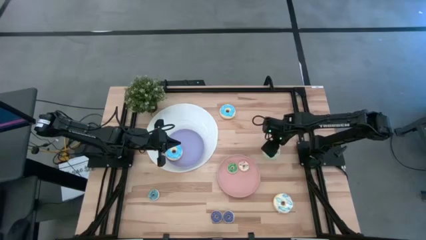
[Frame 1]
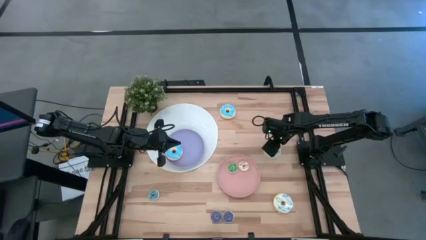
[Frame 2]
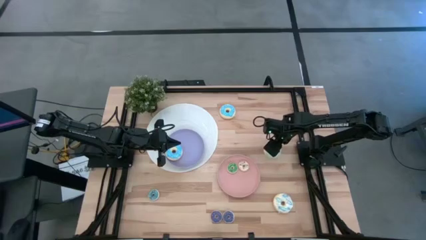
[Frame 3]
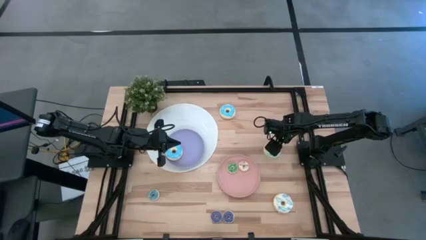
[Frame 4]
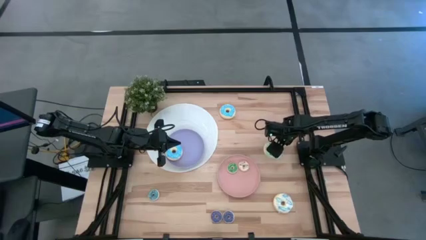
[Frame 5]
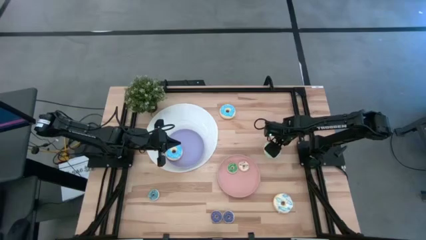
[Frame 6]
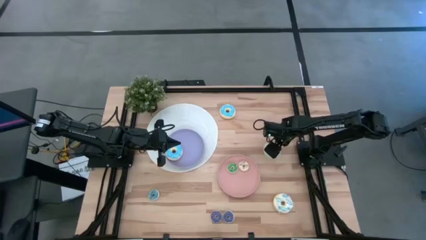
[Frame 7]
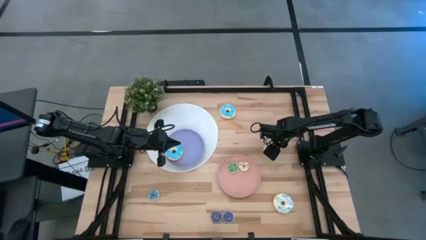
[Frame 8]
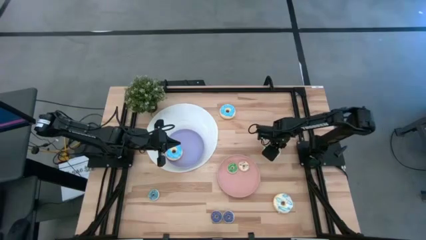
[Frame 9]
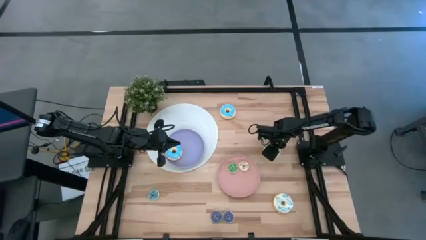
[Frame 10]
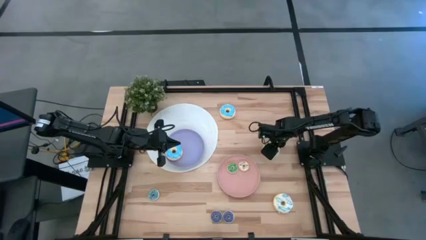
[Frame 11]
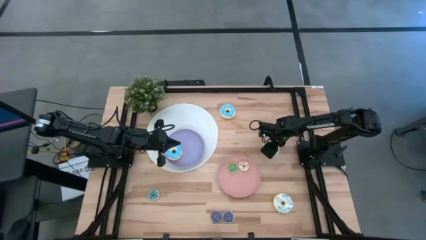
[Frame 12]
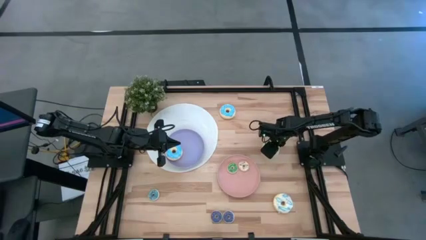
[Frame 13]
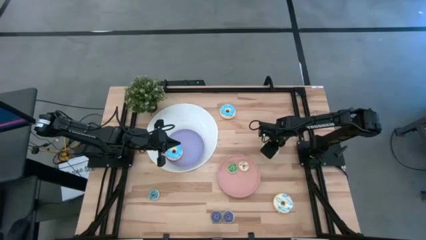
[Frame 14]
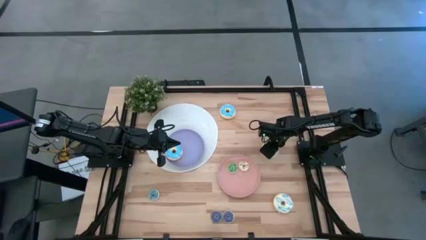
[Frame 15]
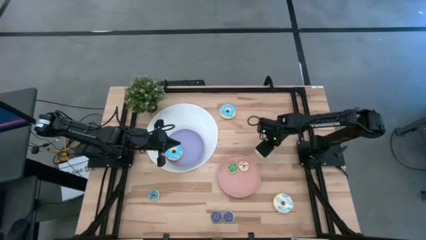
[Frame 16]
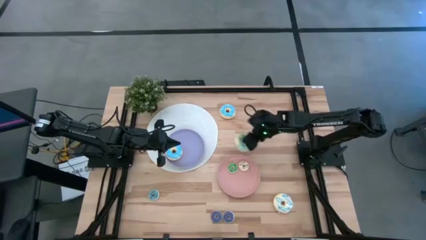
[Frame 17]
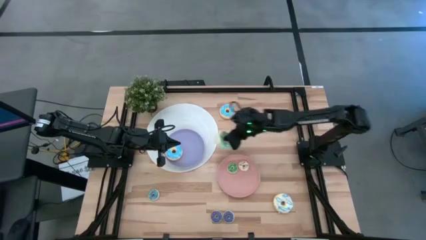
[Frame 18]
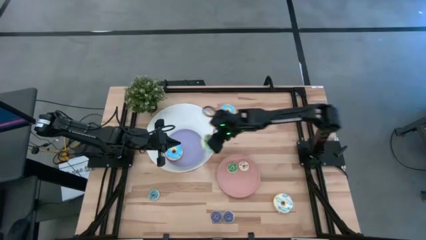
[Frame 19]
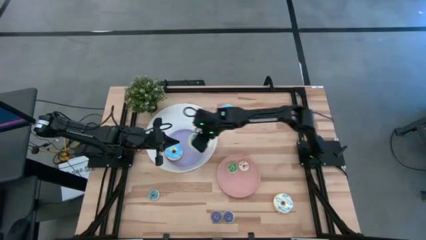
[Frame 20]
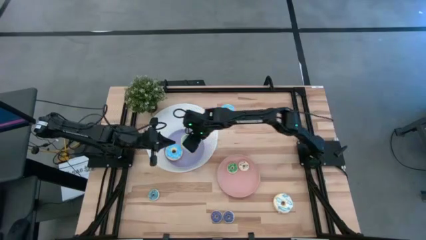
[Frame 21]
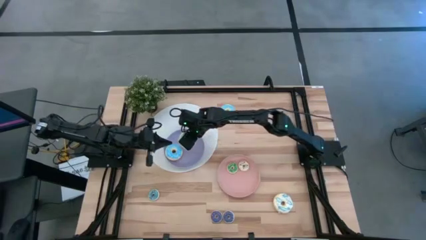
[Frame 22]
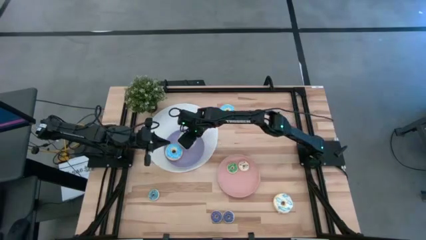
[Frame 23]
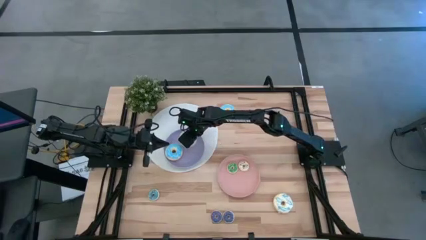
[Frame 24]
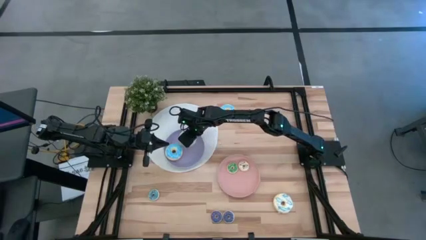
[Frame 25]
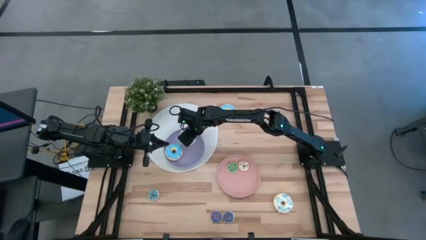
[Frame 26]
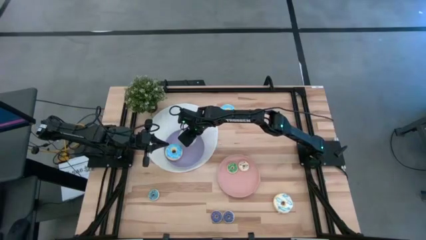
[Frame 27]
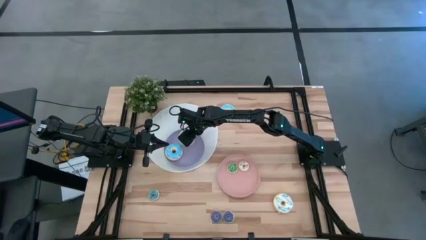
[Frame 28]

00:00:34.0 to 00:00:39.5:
Task: Pick & Place donuts
Put the big light green donut on the purple plate

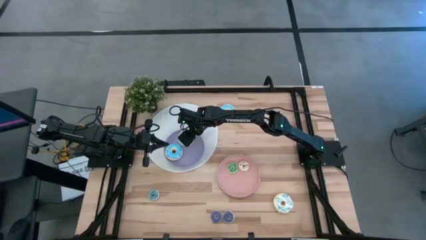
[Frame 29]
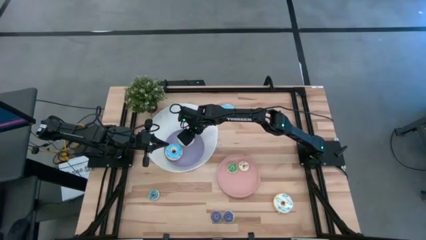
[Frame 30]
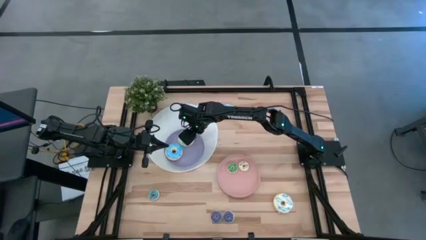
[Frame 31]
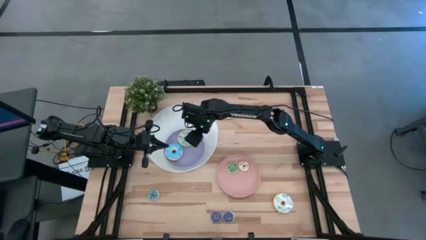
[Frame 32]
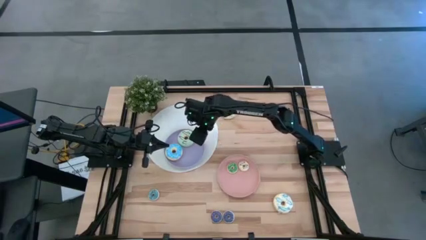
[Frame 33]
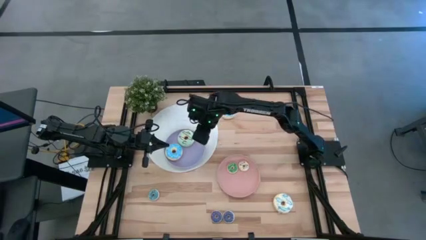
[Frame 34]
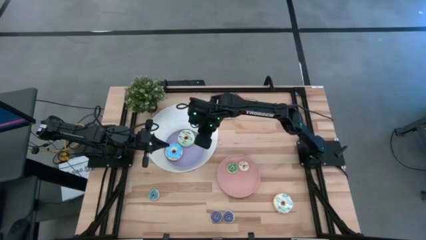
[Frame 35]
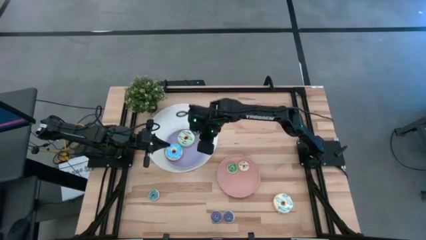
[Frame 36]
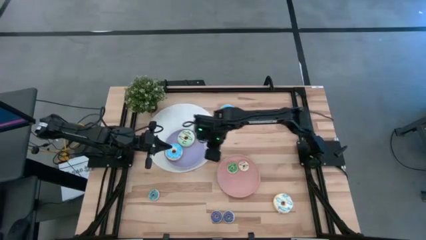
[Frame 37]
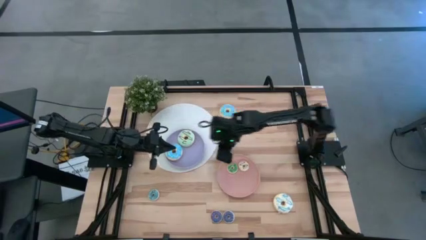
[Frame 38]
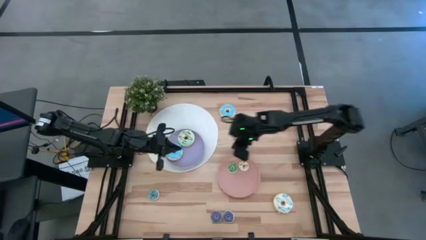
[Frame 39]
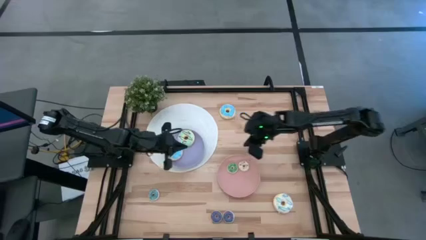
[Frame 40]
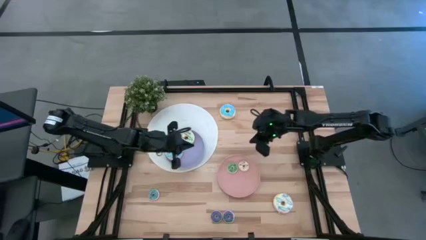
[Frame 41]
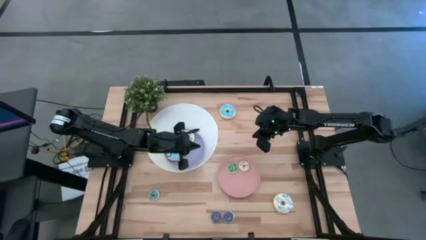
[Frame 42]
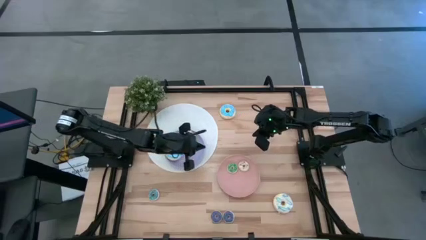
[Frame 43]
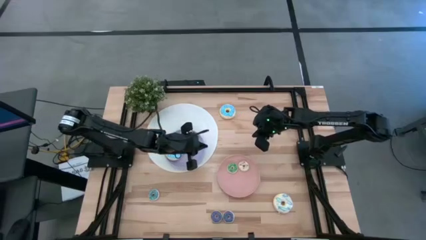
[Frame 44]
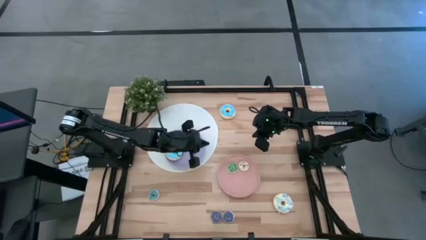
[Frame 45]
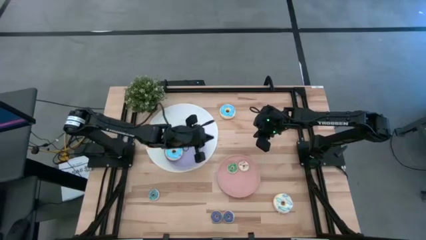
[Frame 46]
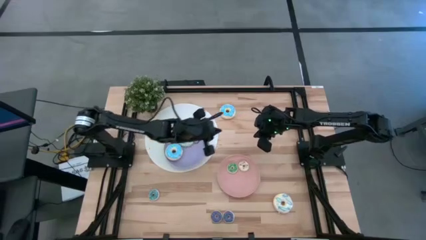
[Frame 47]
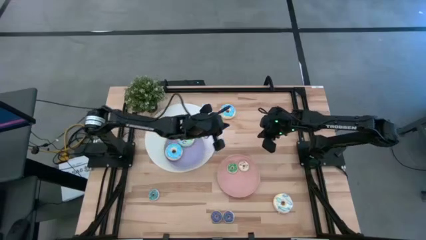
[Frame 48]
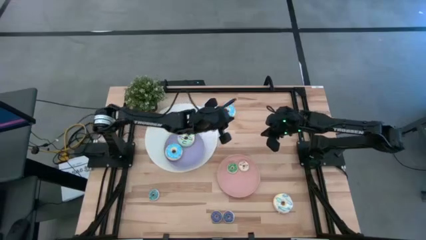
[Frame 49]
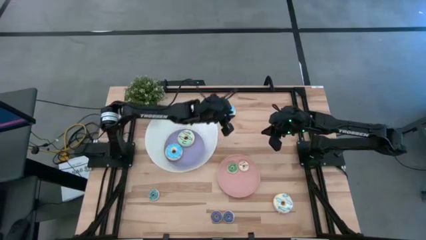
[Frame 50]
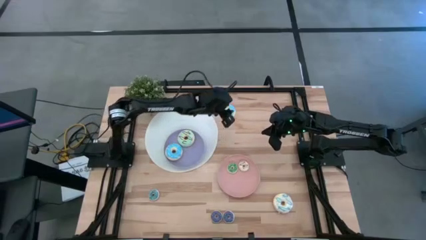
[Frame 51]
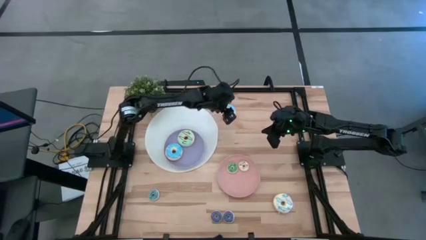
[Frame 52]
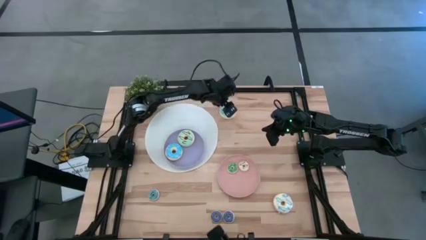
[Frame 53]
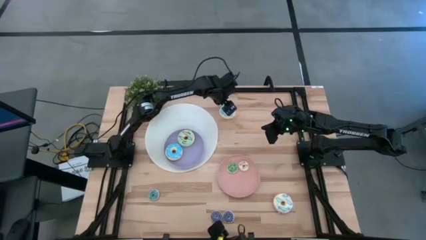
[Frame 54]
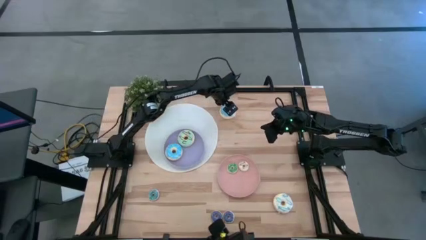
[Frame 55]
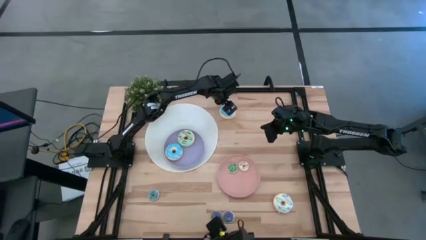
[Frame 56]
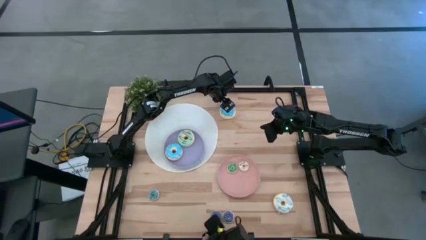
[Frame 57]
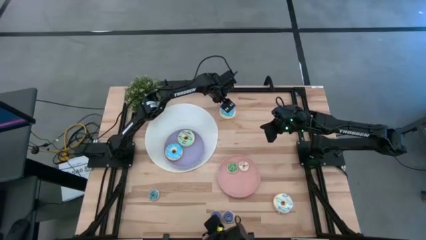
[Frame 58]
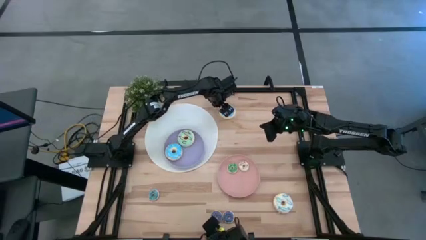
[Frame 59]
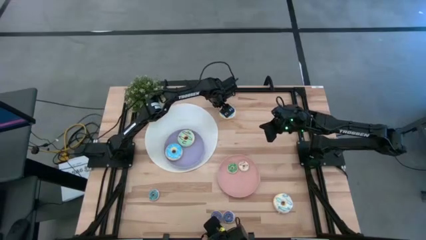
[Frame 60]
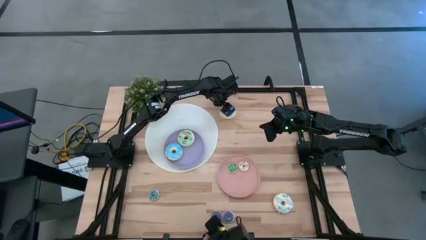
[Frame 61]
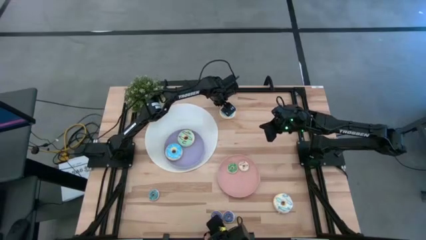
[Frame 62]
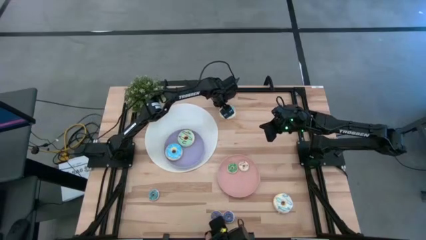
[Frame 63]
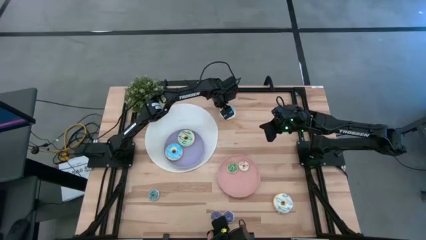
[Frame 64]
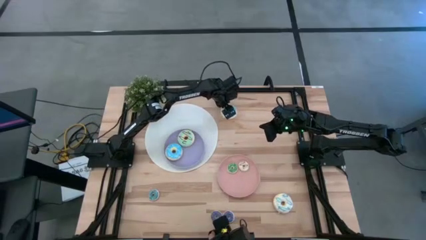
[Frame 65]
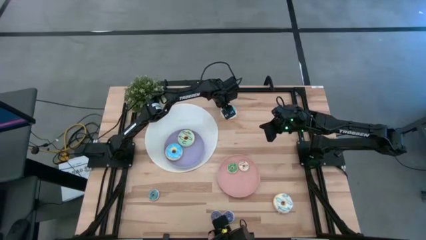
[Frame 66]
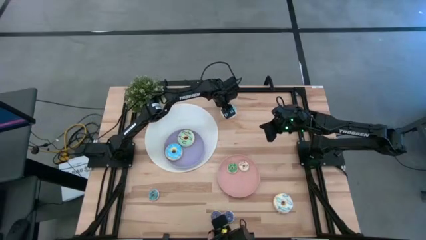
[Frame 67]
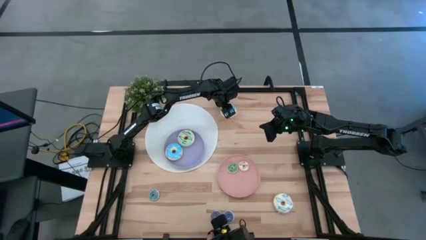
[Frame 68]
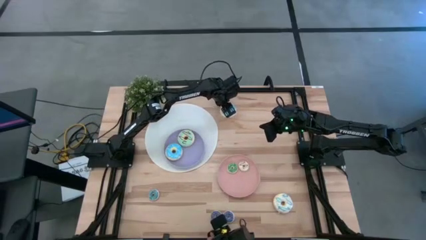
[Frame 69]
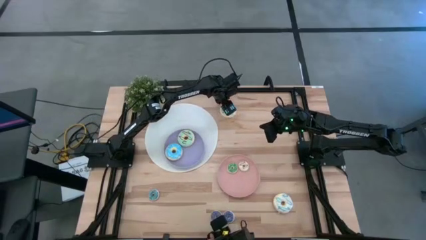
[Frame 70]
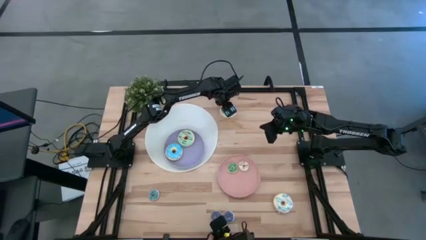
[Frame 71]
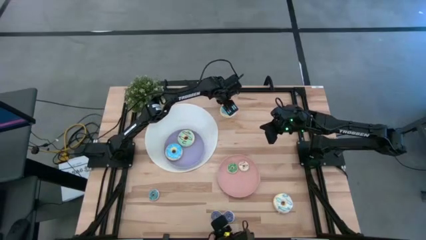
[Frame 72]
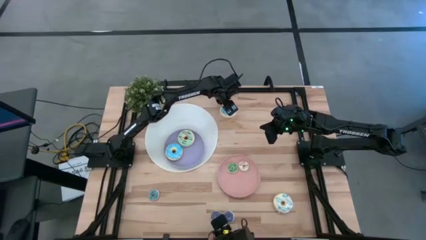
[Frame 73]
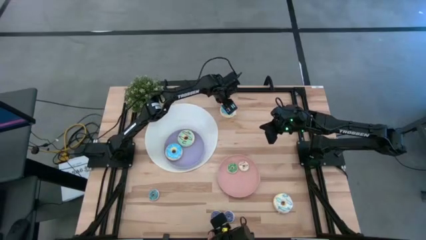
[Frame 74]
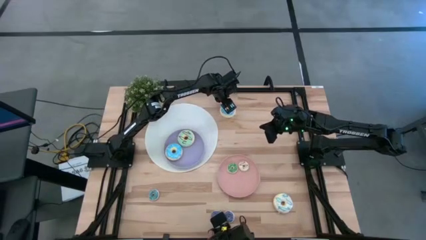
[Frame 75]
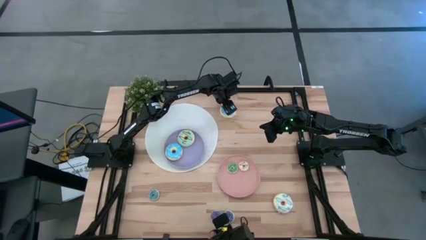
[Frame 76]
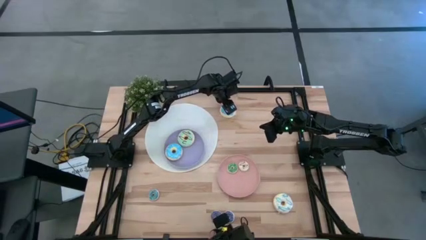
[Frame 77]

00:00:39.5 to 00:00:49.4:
Put the big light blue donut on the purple plate
